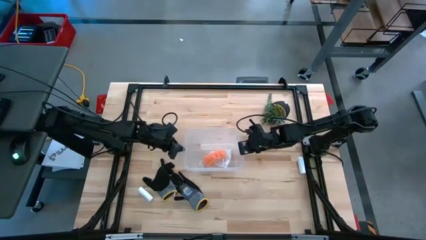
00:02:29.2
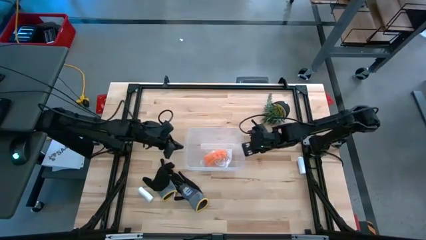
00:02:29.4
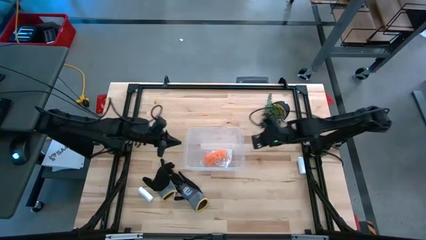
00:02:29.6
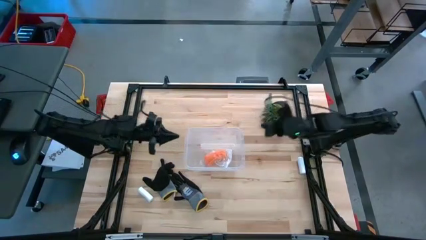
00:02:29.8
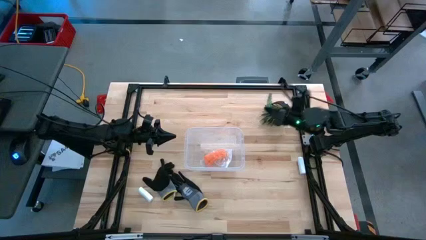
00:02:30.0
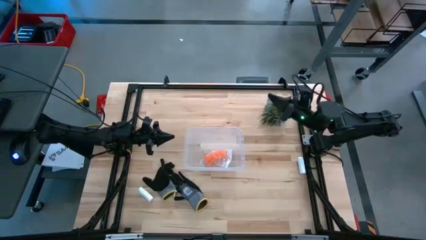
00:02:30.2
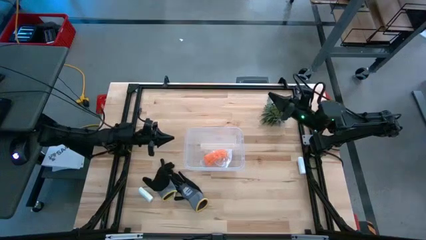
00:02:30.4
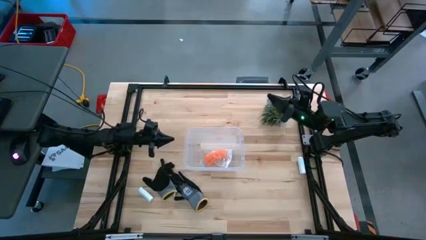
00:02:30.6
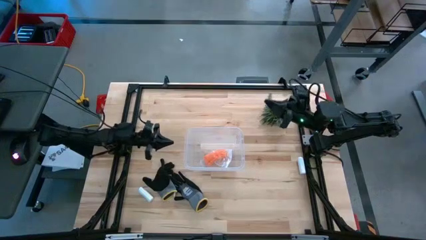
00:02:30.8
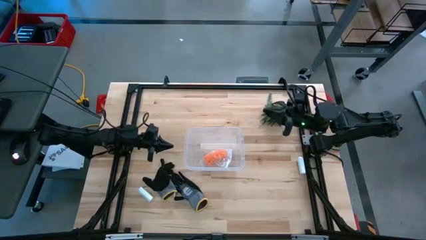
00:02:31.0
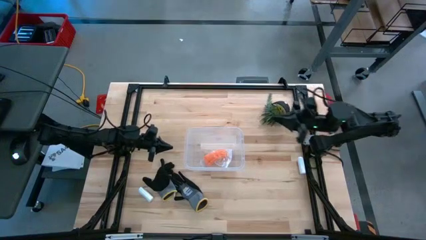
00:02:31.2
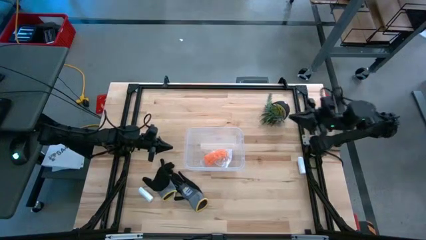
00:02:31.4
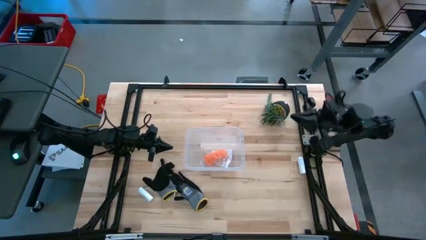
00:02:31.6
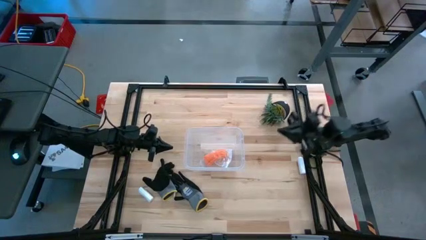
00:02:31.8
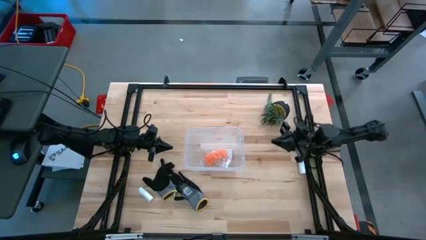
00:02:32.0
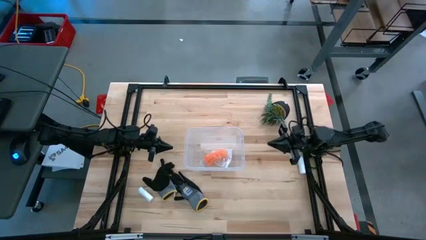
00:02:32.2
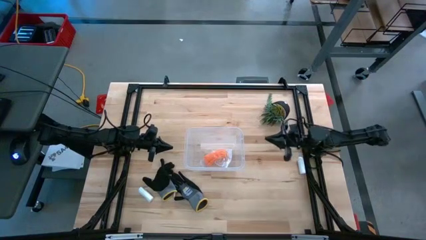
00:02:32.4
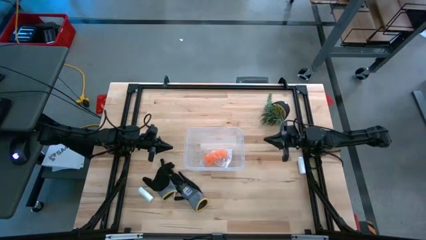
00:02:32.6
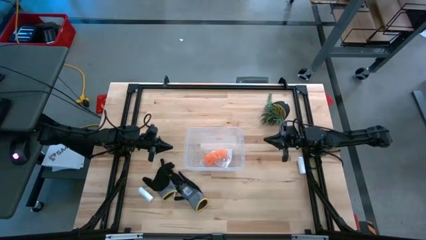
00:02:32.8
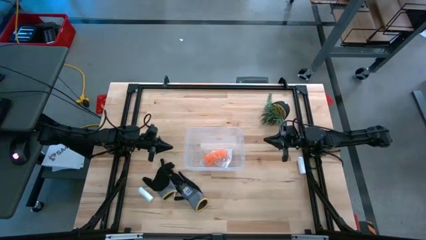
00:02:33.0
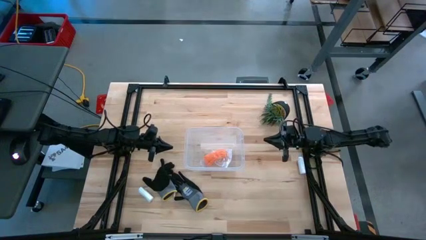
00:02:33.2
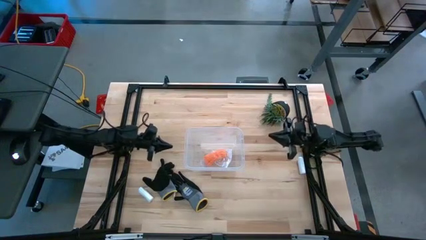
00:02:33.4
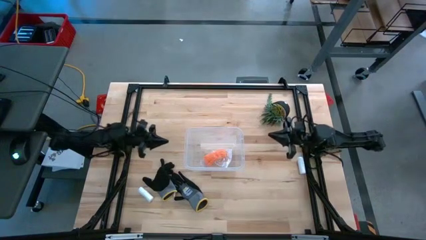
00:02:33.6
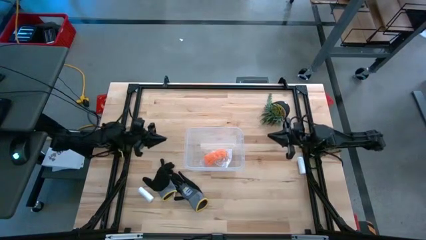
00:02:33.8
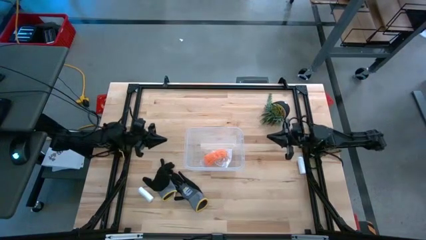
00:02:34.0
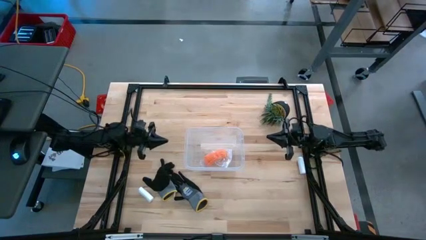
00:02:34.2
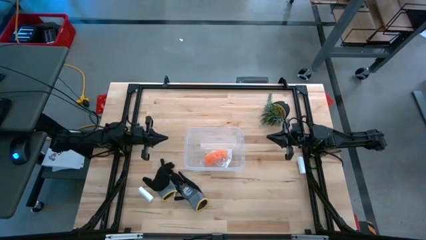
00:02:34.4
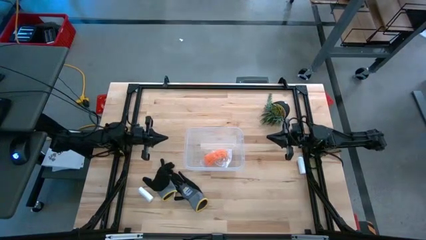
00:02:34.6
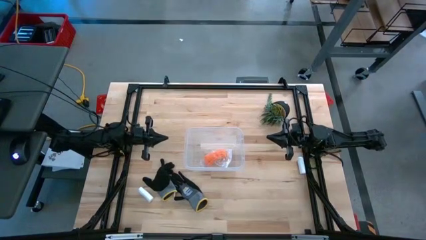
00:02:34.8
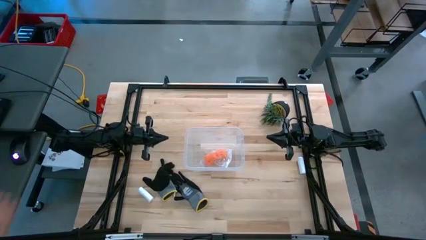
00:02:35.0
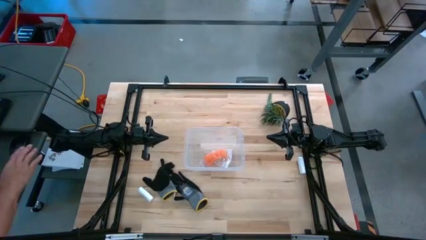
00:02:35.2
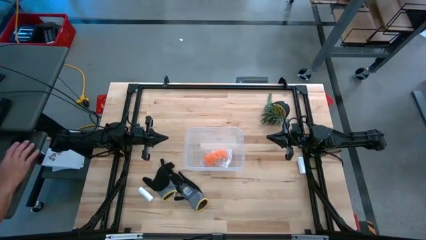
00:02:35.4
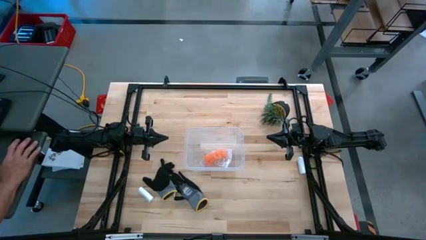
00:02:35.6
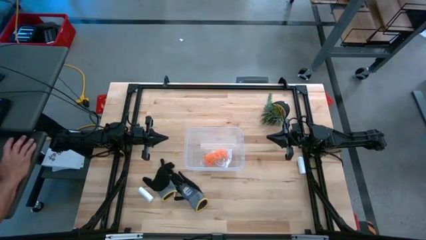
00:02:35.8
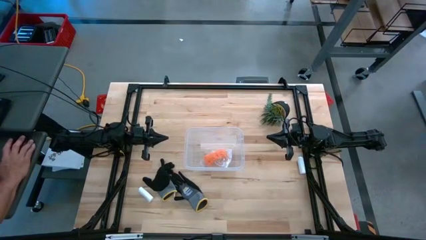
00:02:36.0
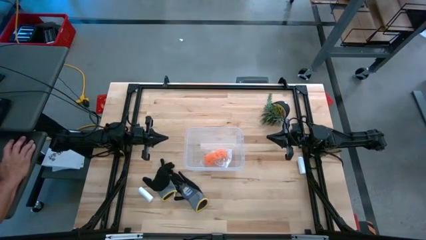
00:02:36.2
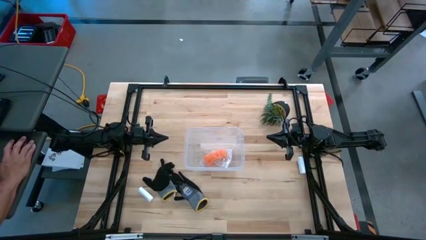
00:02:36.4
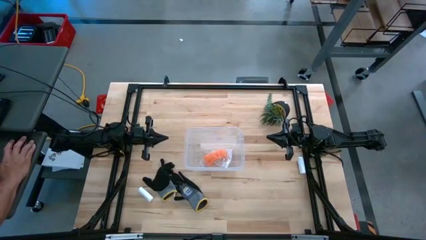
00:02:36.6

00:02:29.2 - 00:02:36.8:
Task: Roll bandage
Return to Home Position

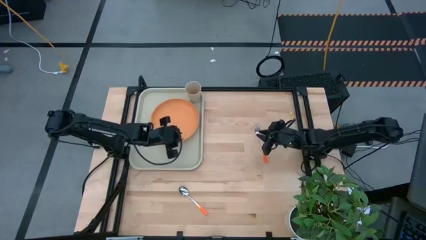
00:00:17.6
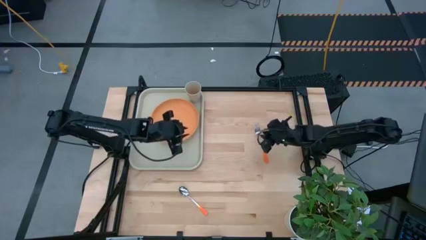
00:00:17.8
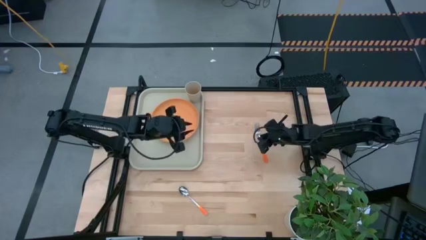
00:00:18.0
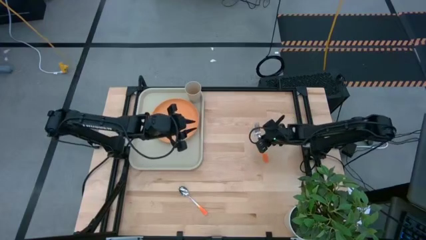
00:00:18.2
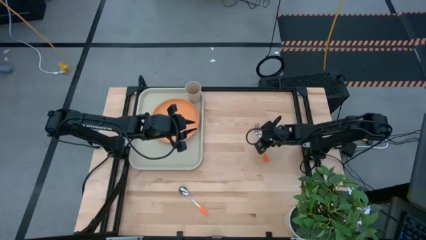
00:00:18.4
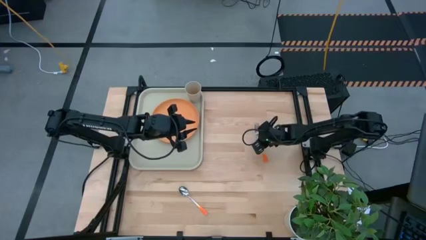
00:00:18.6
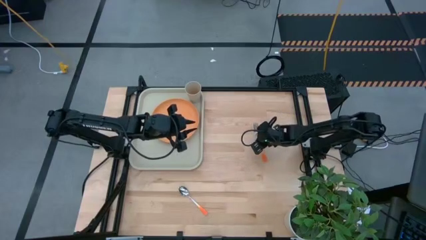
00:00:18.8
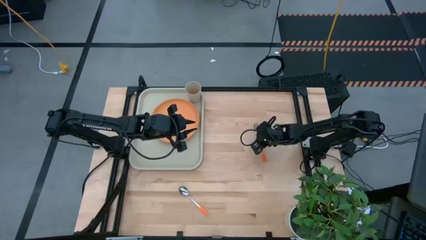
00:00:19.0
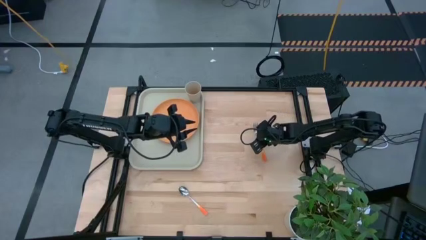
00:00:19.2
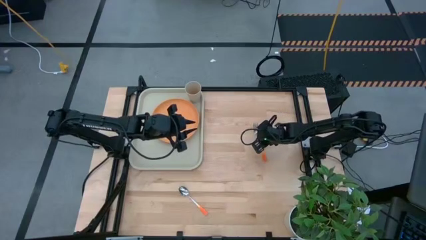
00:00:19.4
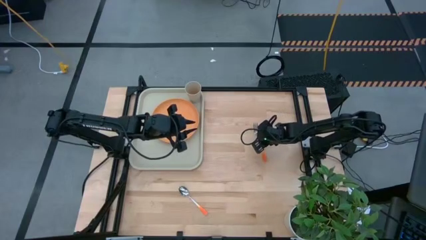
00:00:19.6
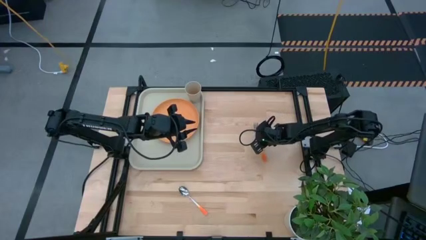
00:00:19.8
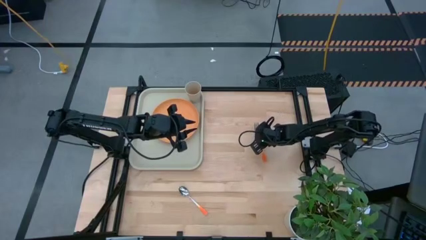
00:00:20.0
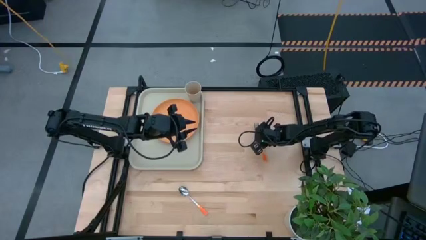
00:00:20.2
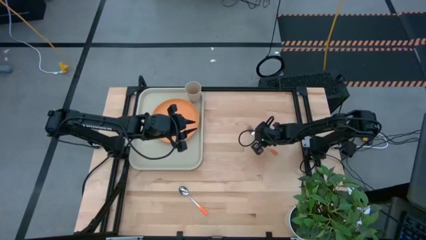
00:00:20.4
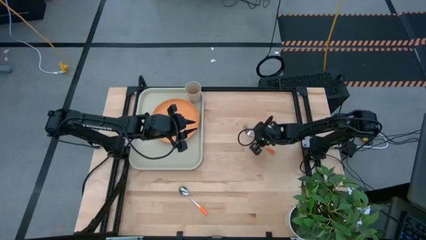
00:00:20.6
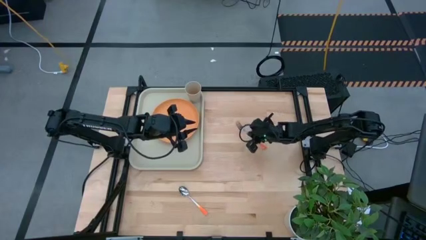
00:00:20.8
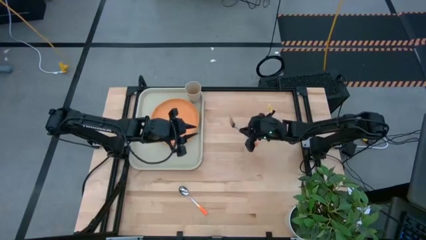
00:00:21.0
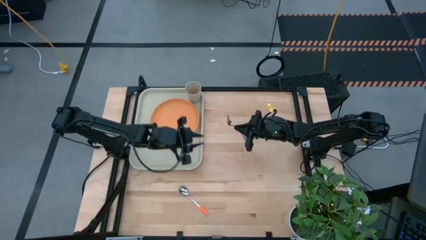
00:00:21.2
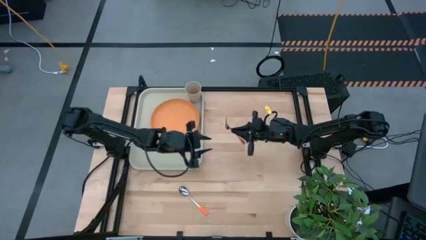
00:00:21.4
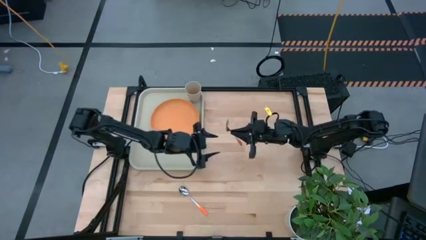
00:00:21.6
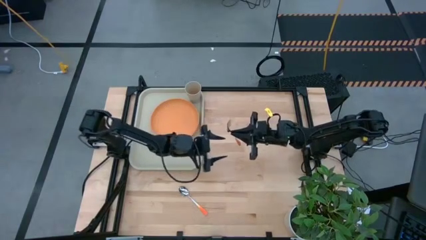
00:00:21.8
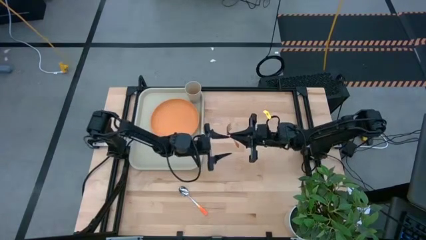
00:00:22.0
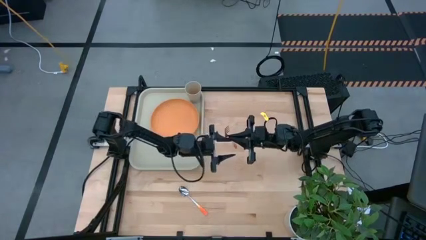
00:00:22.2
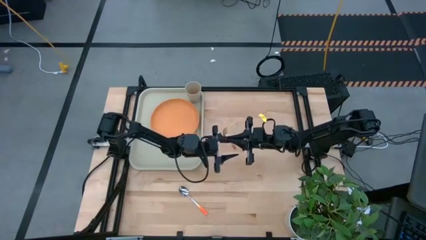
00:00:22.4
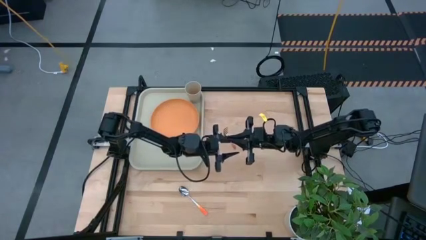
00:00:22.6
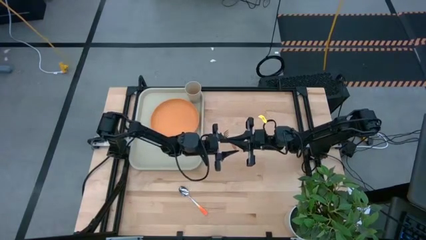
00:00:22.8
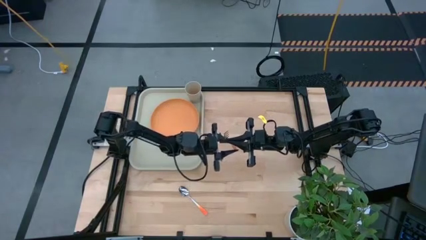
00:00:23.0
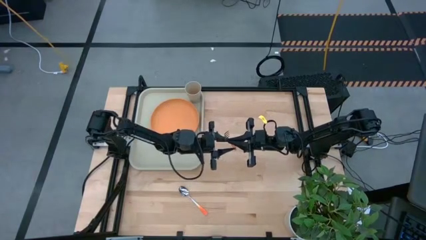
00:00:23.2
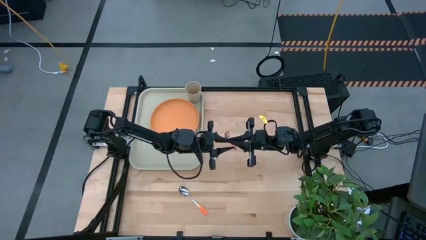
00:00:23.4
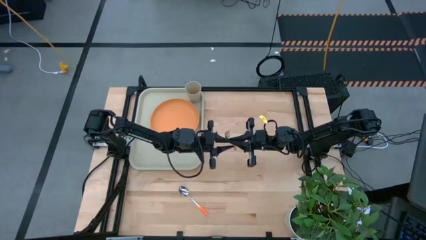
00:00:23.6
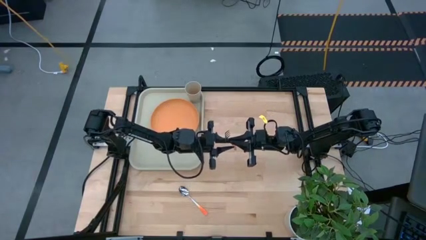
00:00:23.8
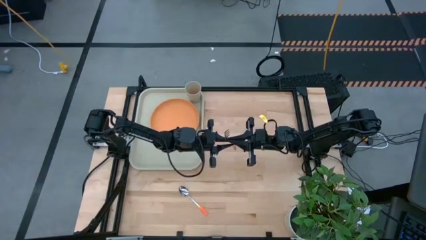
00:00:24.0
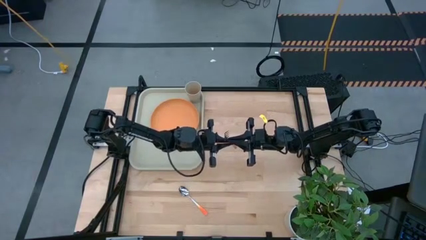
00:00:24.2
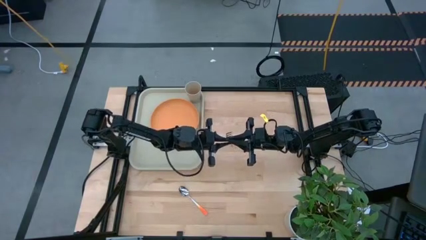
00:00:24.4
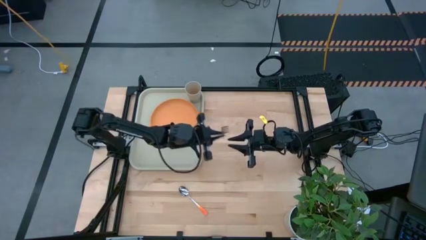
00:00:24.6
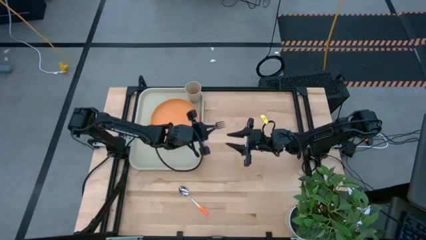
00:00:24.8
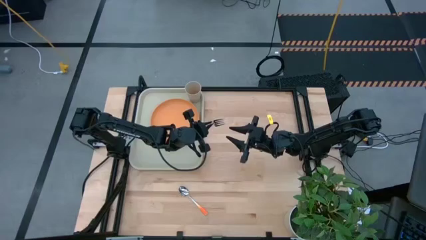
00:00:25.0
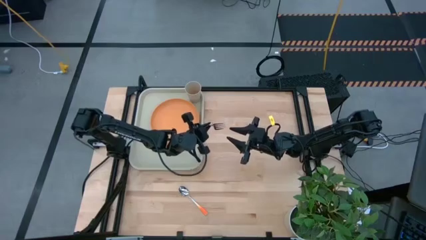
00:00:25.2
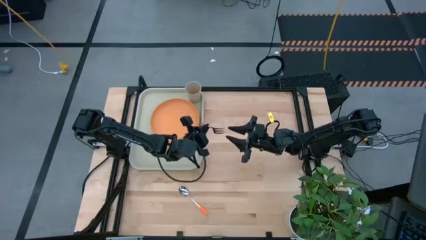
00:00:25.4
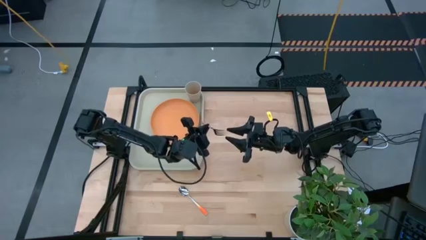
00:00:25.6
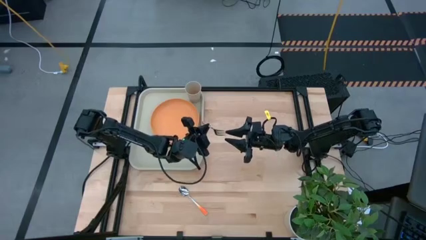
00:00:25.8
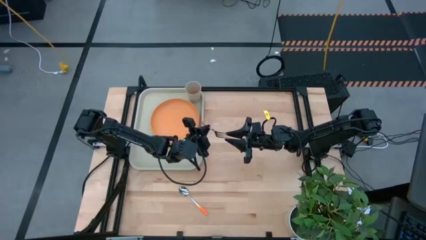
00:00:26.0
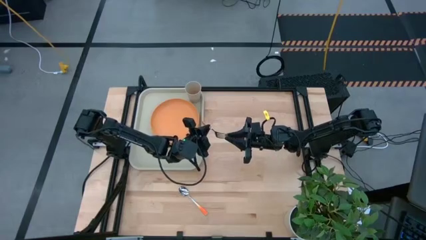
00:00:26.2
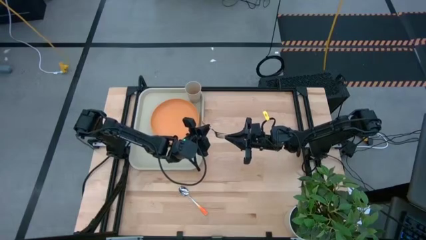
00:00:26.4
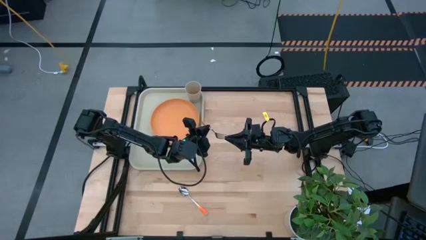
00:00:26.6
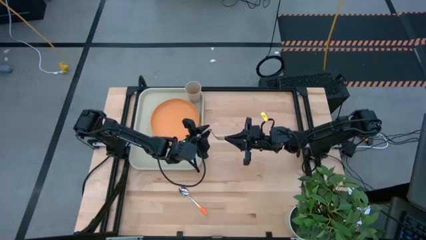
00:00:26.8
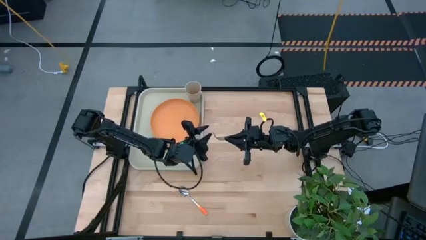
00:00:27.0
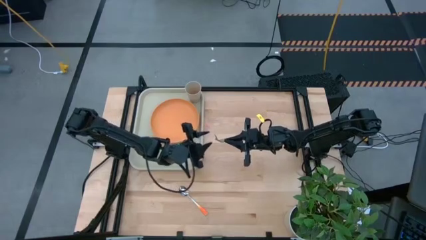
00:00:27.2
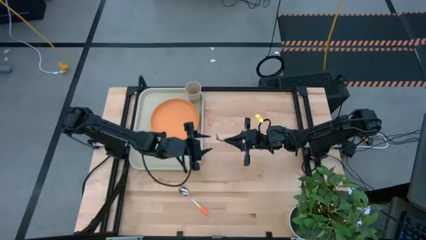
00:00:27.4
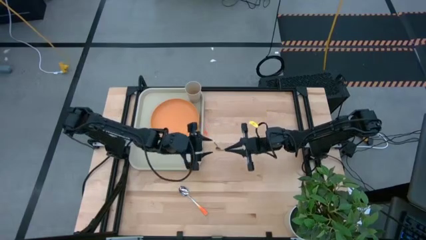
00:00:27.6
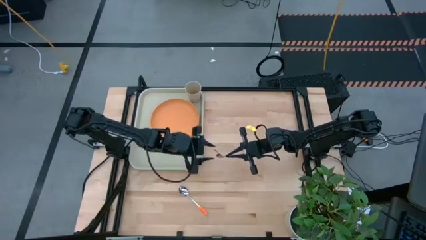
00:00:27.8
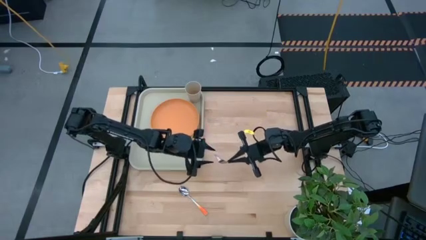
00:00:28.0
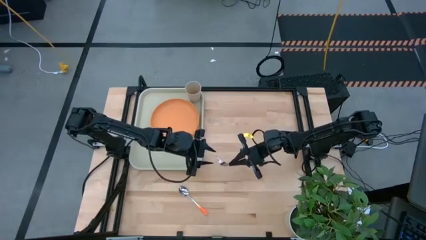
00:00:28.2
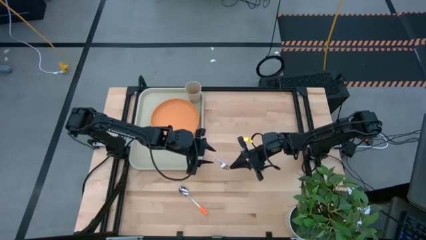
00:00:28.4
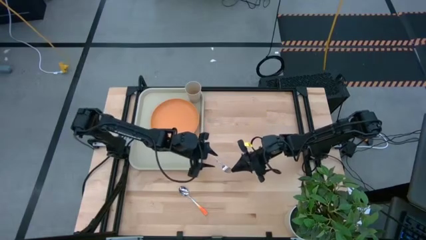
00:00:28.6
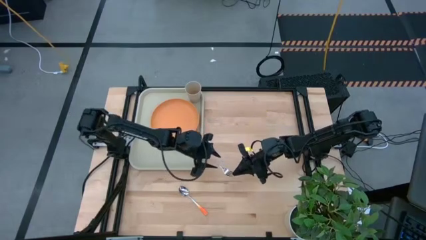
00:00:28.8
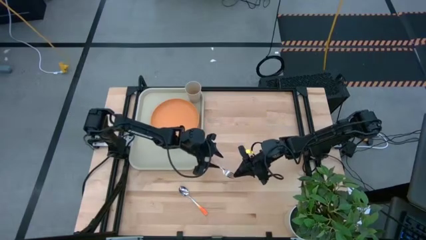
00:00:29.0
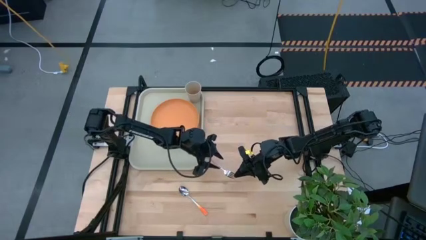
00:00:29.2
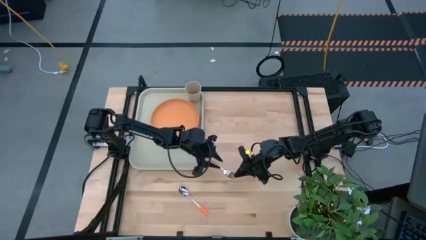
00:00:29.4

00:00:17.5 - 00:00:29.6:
Task: Pick and place plate/cup/fork/spoon on tray
Put the orange fork on the light brown tray
